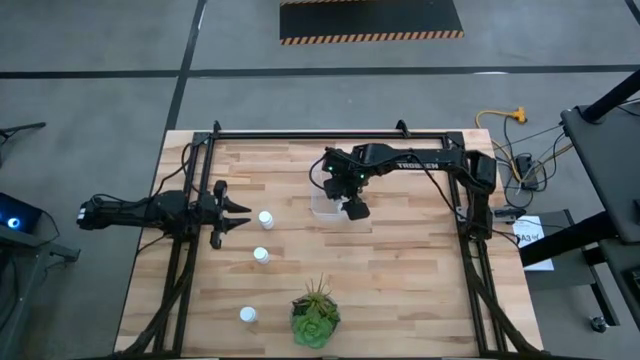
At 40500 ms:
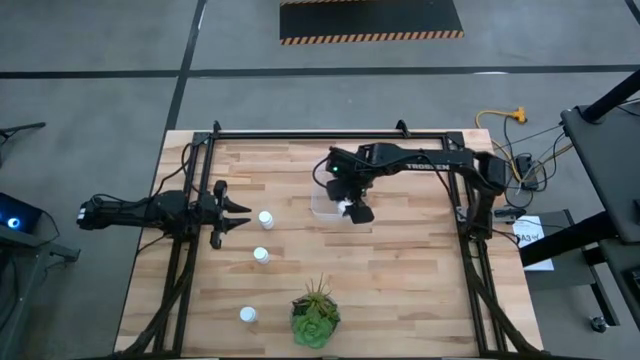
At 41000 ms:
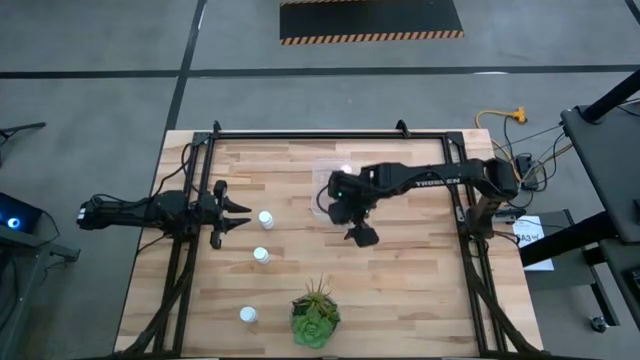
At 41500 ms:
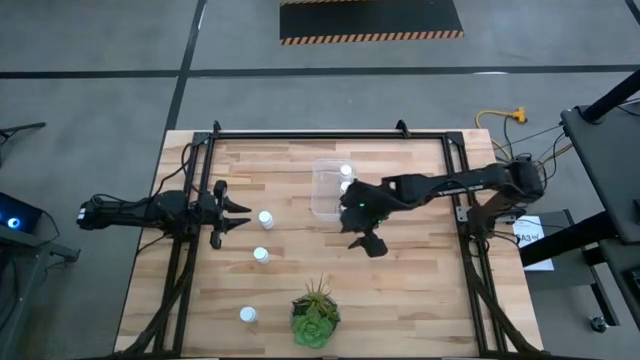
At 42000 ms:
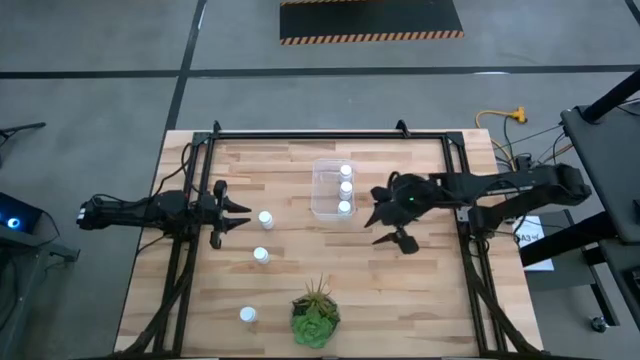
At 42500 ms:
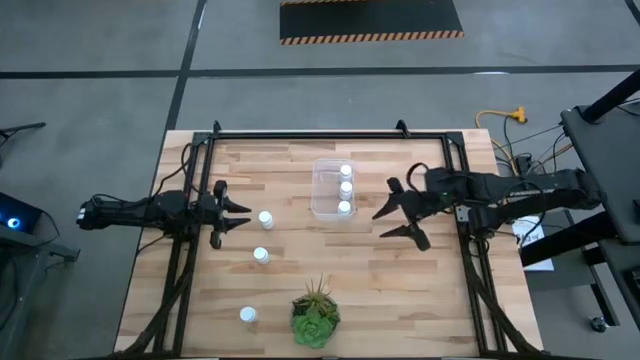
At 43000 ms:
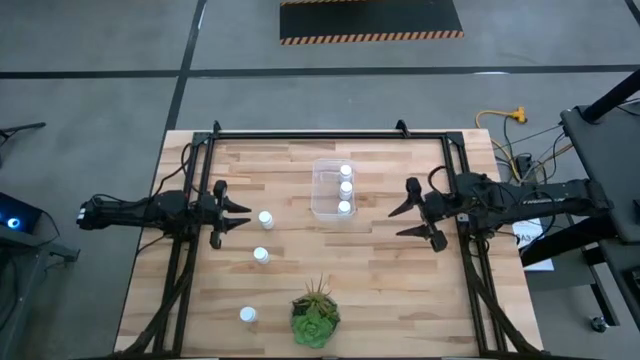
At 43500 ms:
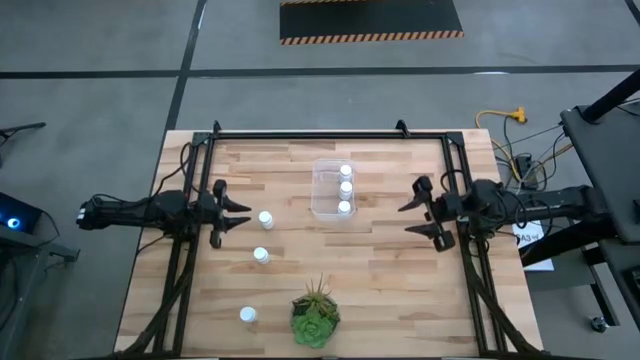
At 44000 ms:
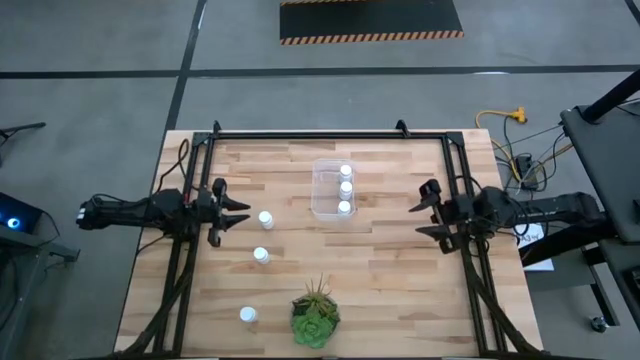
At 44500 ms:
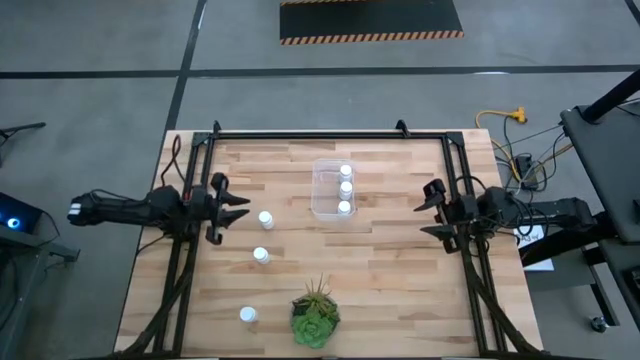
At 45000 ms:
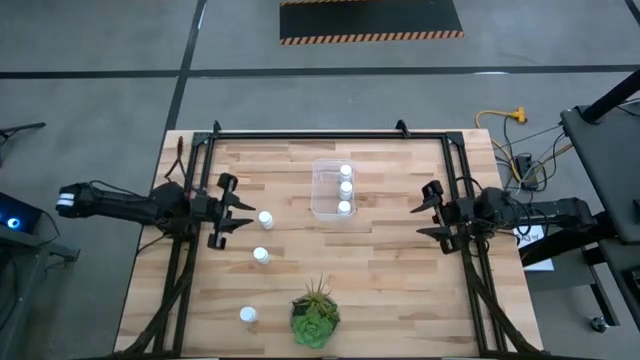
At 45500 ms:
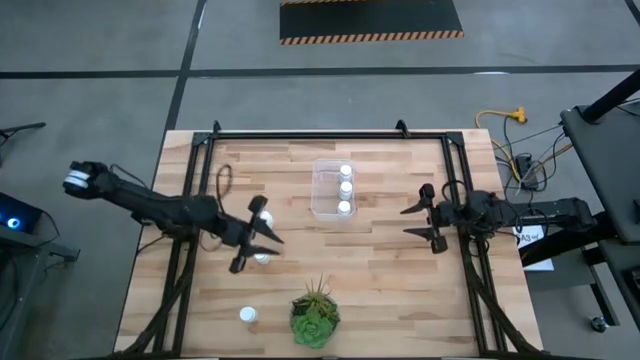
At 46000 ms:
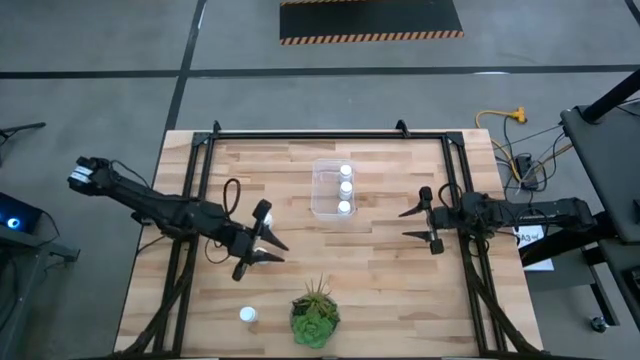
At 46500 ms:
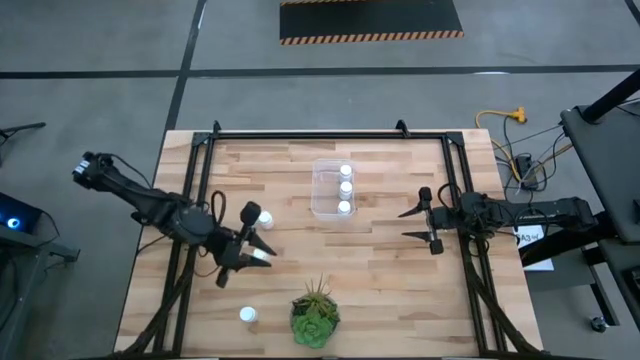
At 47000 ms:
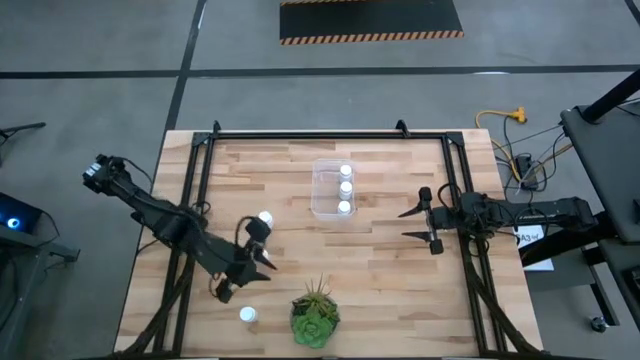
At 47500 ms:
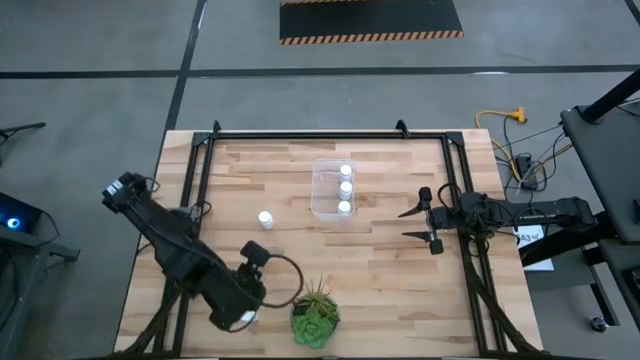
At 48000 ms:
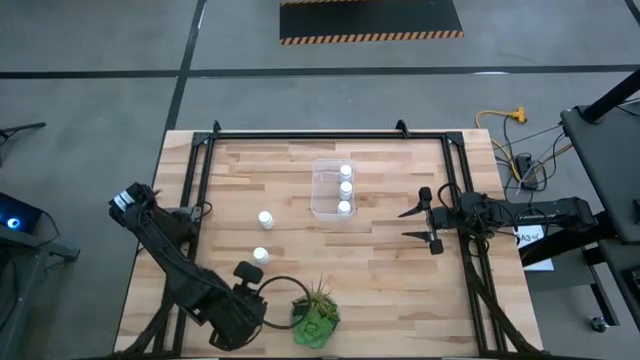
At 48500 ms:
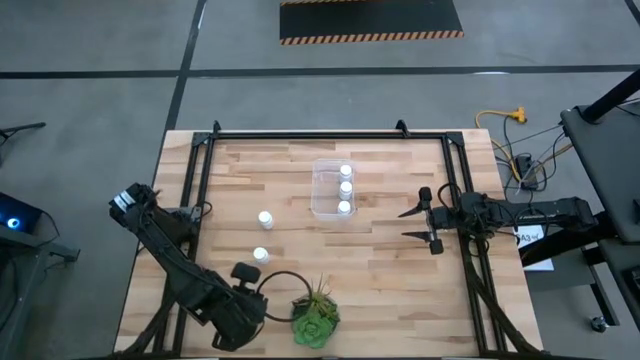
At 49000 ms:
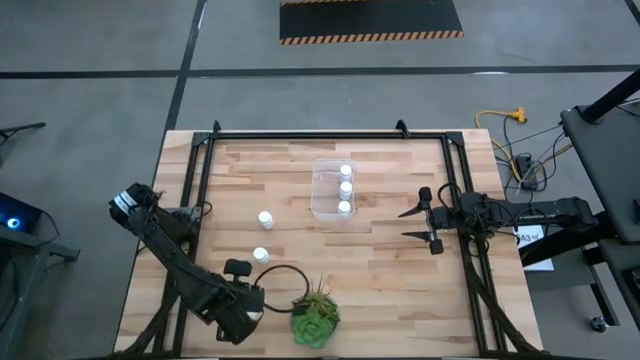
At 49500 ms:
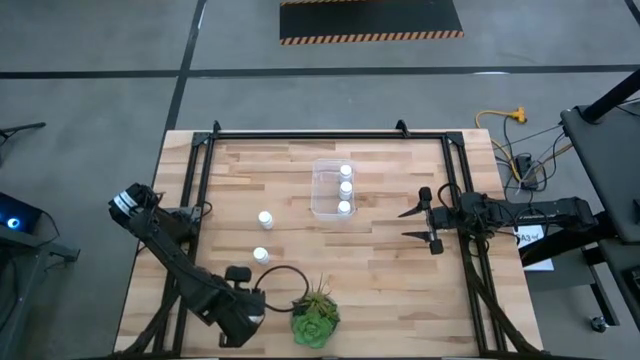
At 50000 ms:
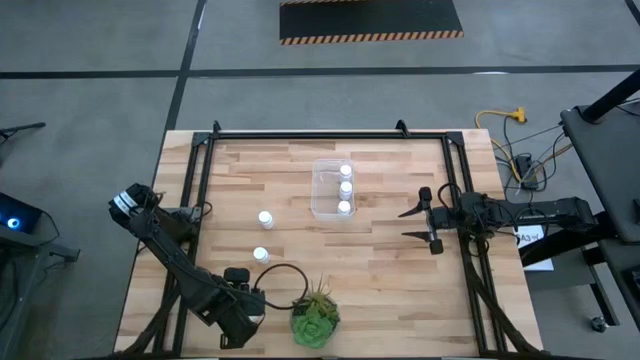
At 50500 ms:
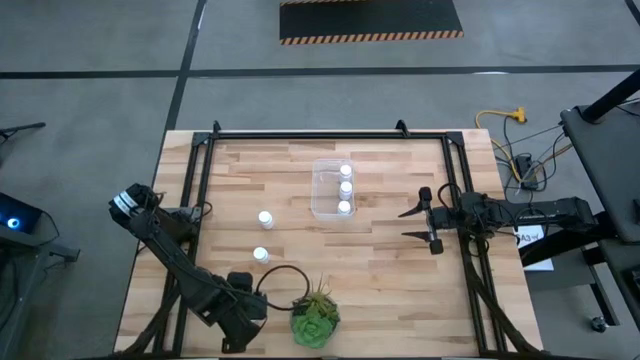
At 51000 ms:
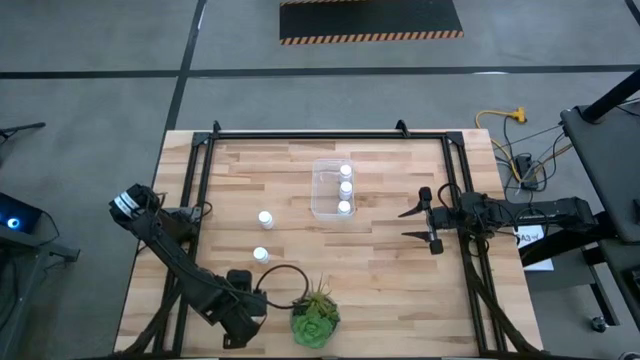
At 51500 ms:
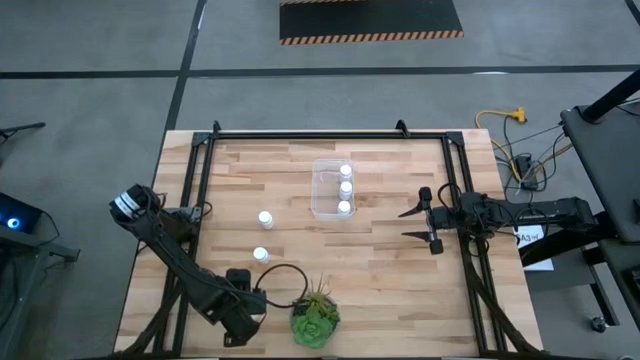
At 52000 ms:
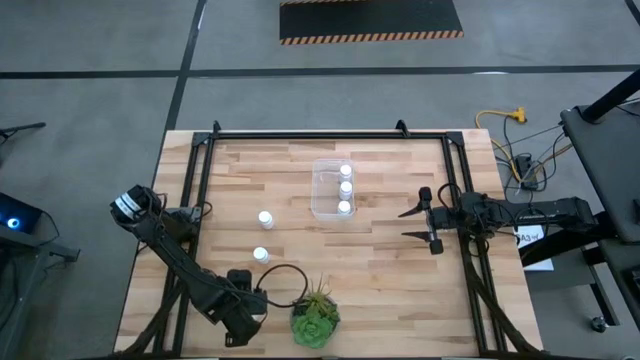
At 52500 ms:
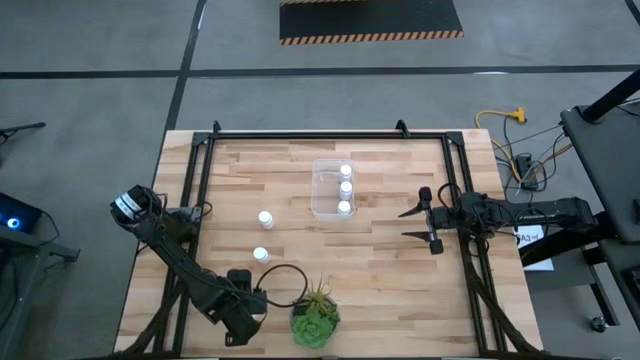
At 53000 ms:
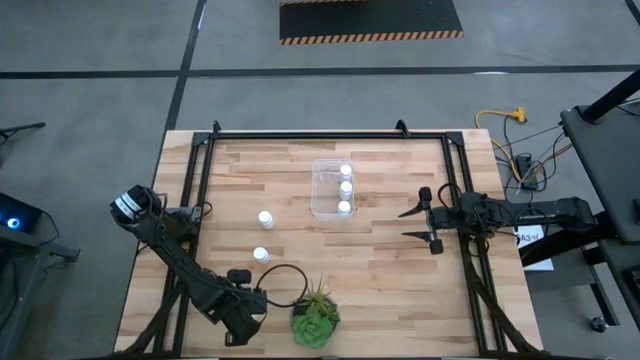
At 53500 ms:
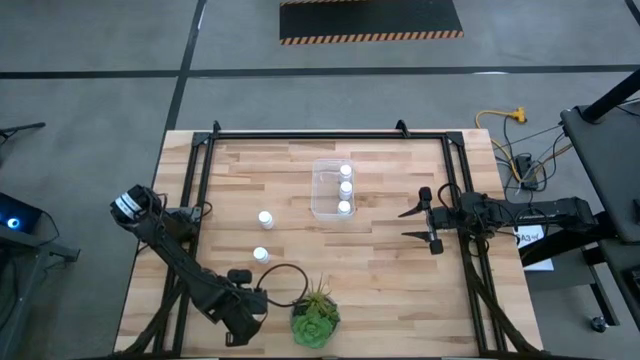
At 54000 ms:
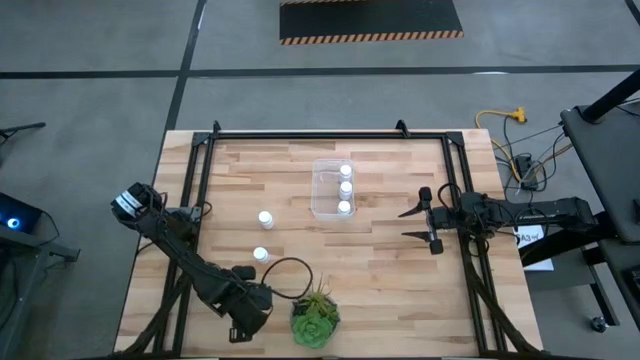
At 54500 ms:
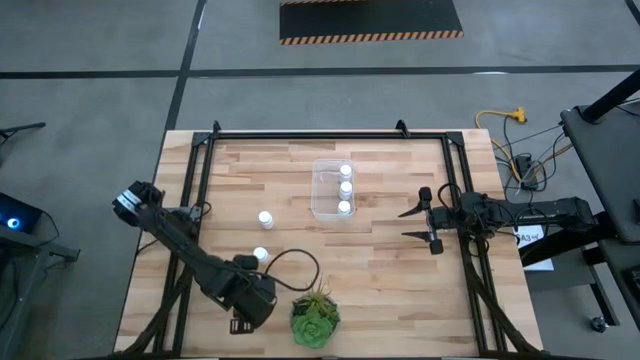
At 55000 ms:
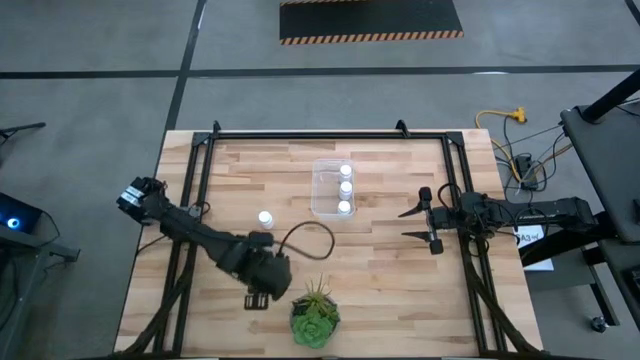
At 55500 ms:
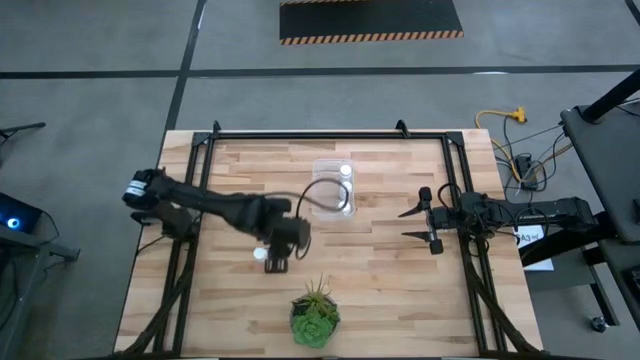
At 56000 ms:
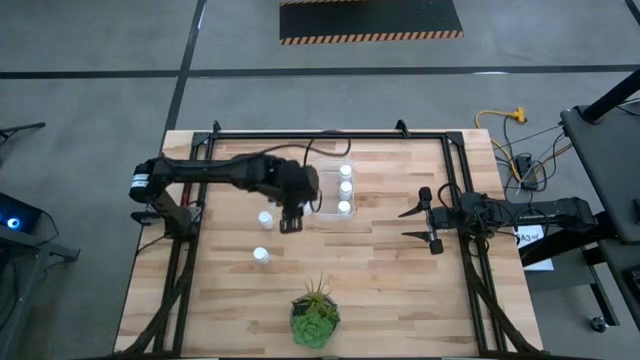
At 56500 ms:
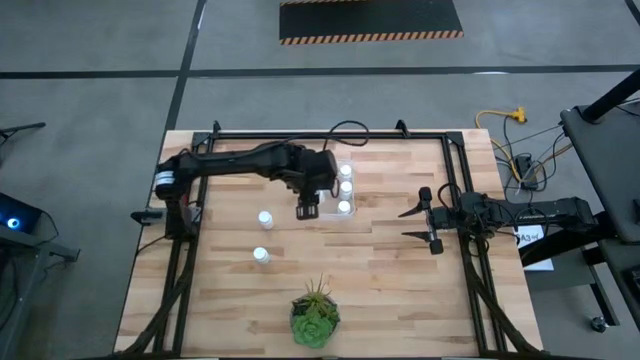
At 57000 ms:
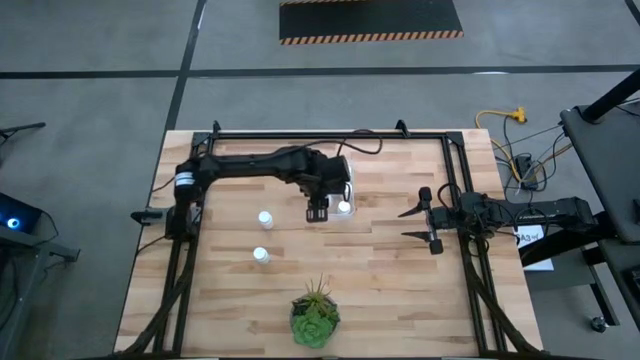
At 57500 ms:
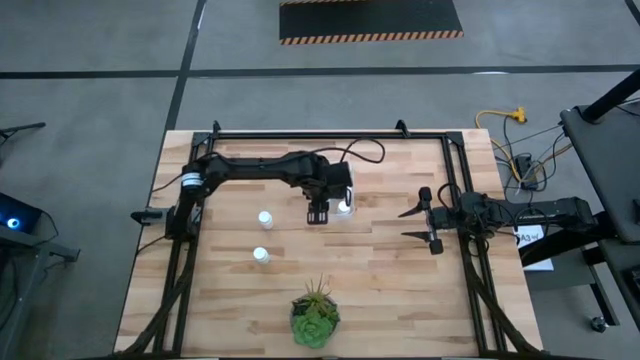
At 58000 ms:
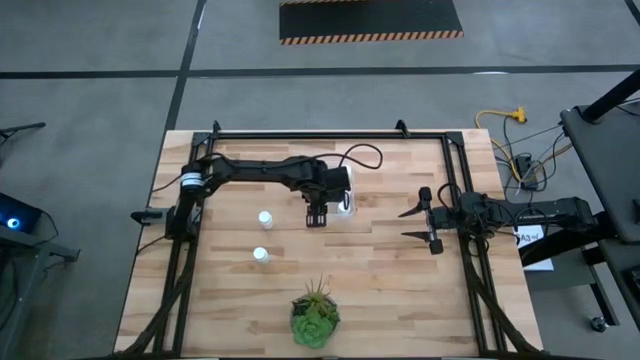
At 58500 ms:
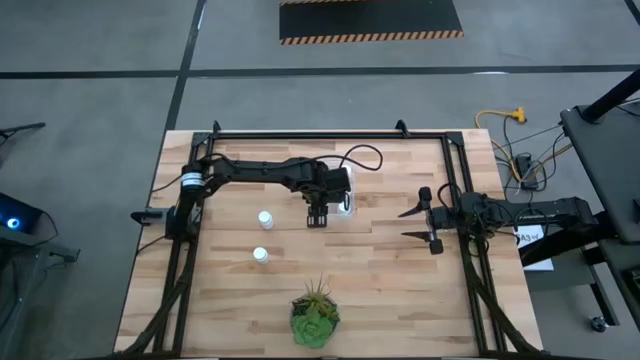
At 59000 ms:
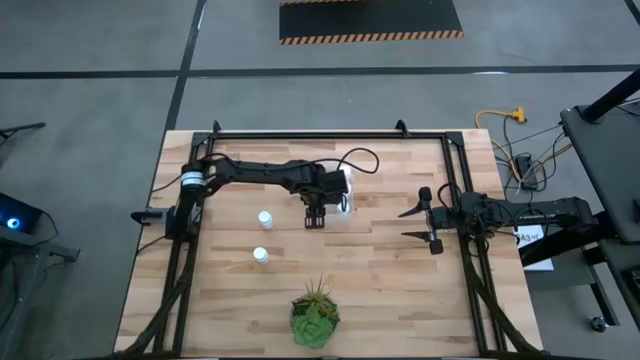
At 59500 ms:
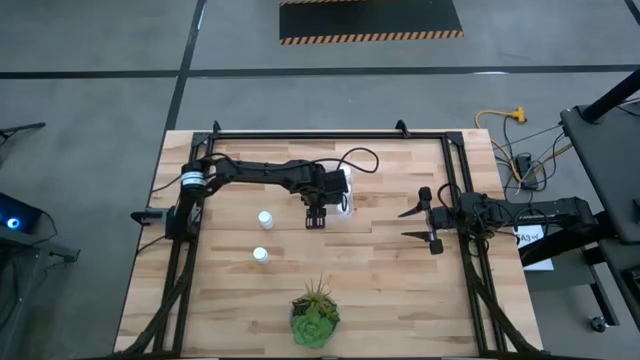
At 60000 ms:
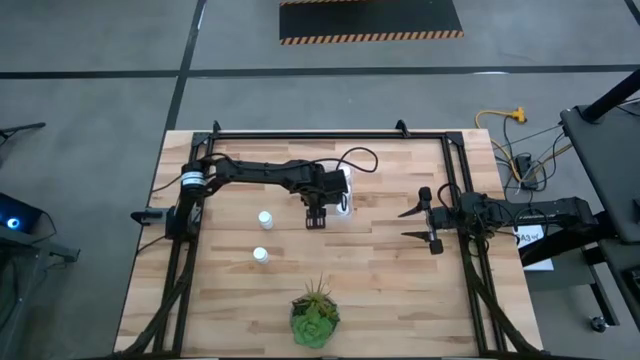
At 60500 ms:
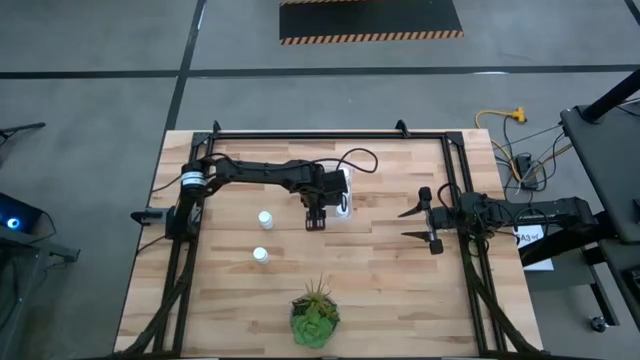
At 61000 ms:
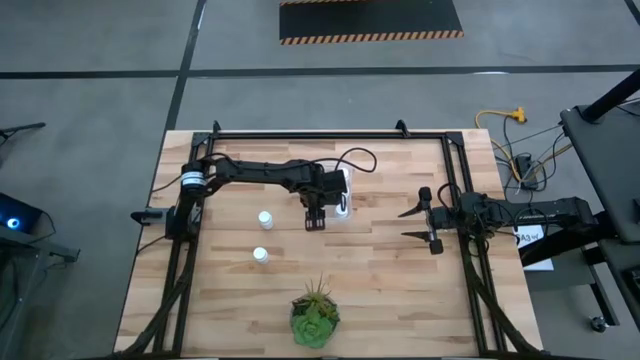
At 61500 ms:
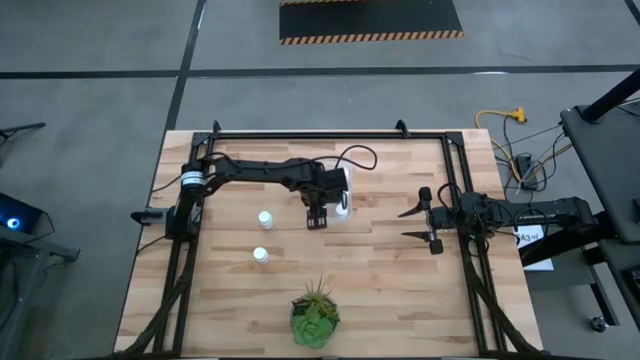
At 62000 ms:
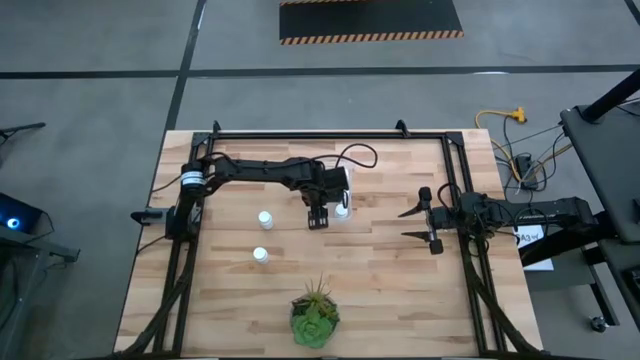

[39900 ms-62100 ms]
Task: Pick and place pill bottles into a basket
Put the white pill bottle into the transparent bin
